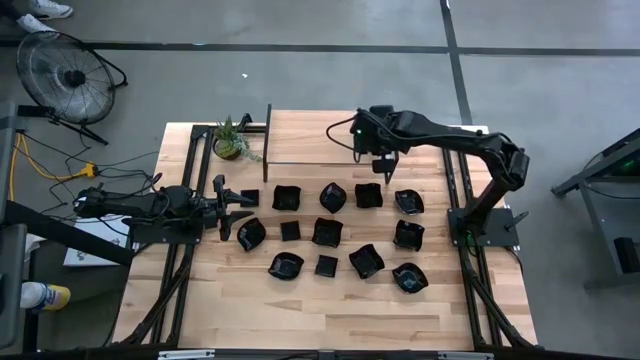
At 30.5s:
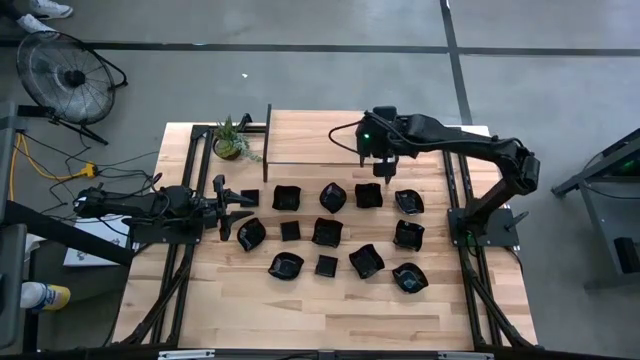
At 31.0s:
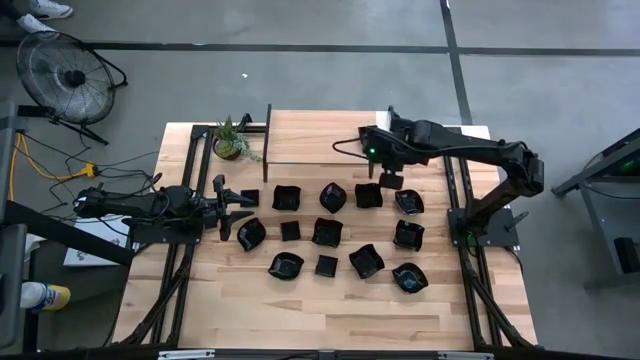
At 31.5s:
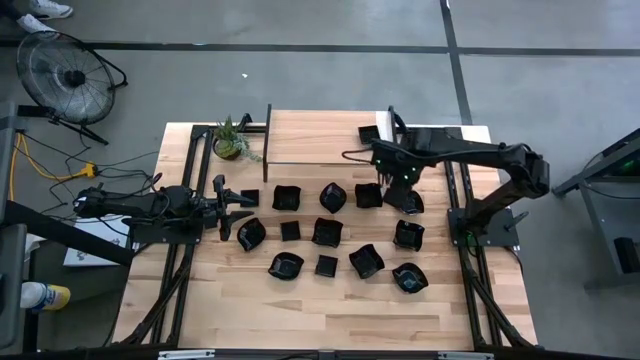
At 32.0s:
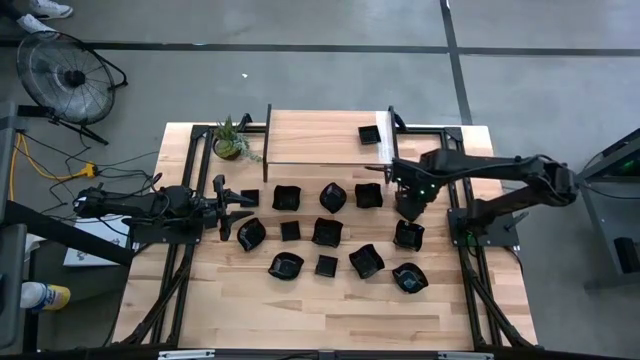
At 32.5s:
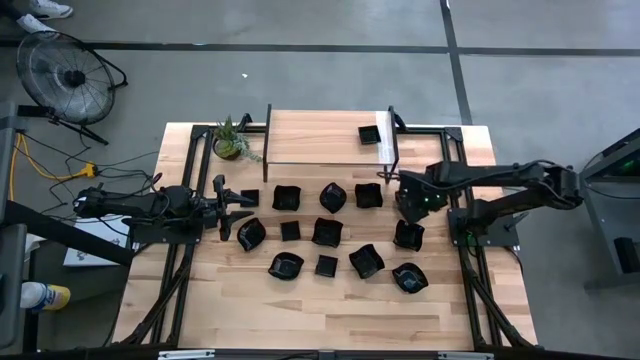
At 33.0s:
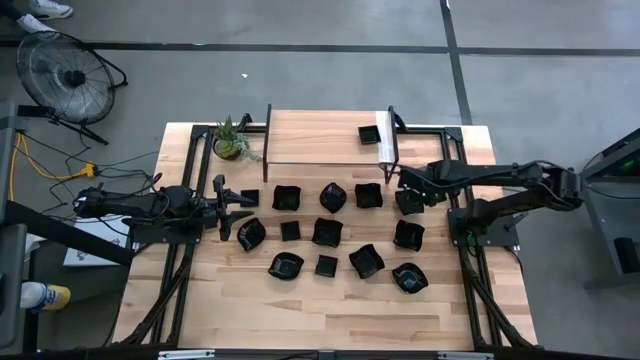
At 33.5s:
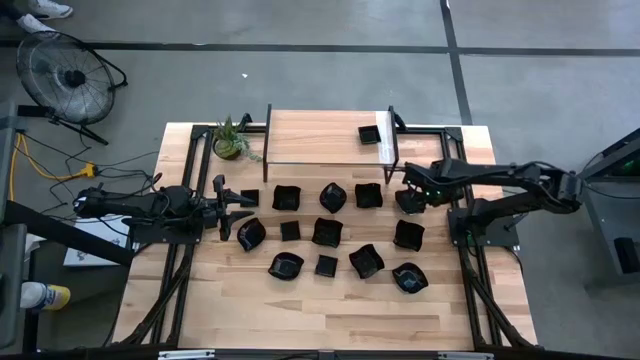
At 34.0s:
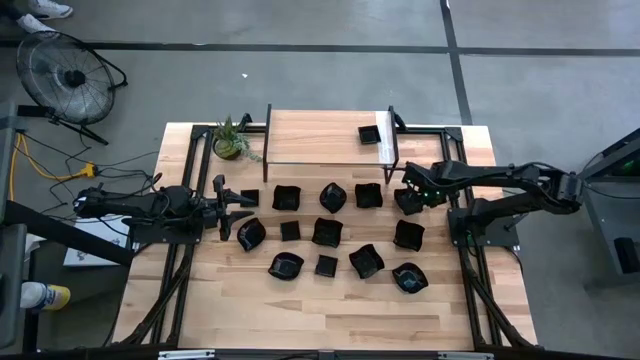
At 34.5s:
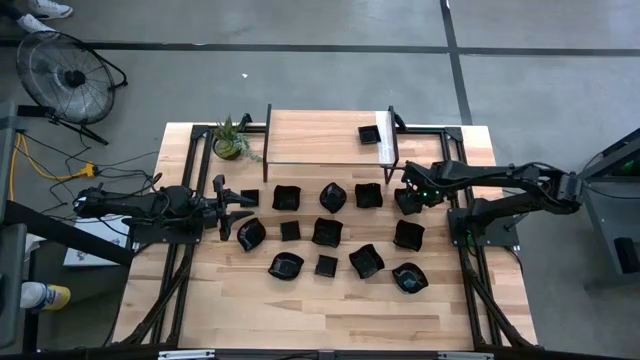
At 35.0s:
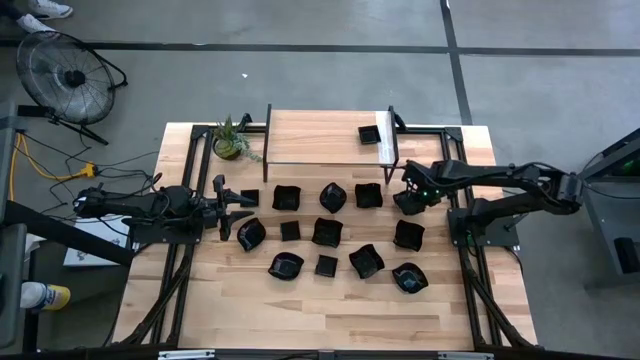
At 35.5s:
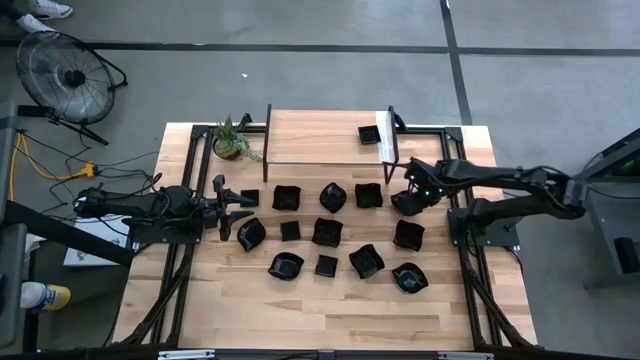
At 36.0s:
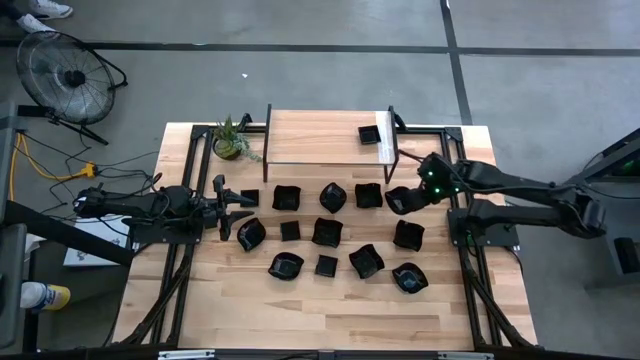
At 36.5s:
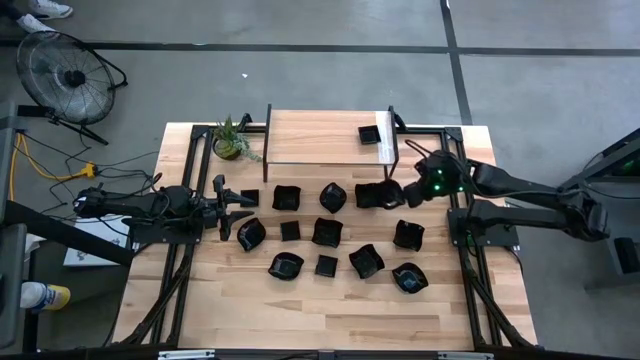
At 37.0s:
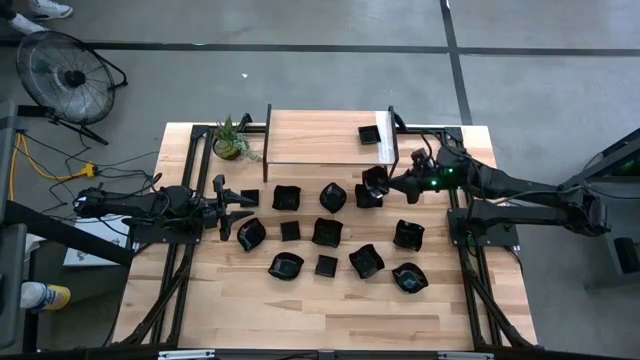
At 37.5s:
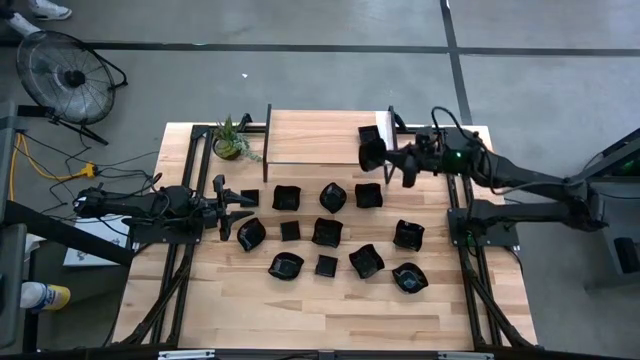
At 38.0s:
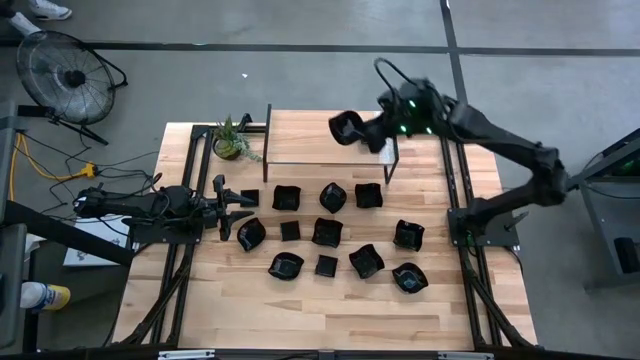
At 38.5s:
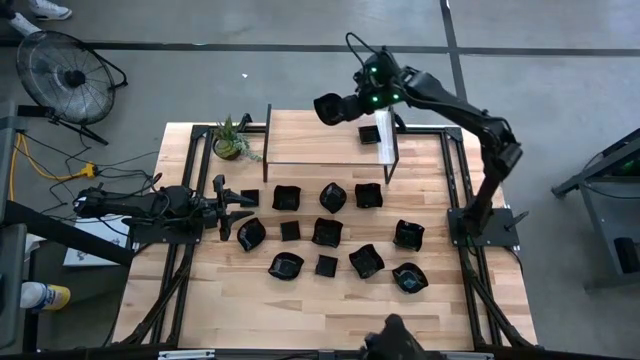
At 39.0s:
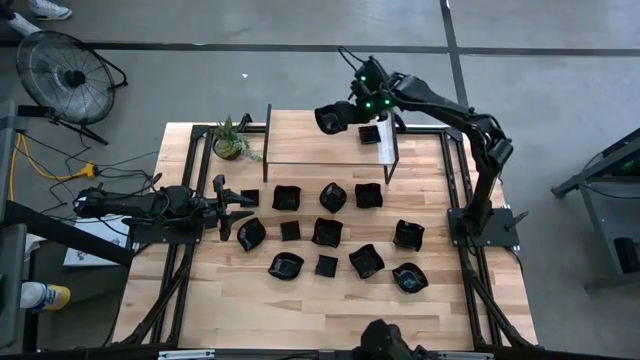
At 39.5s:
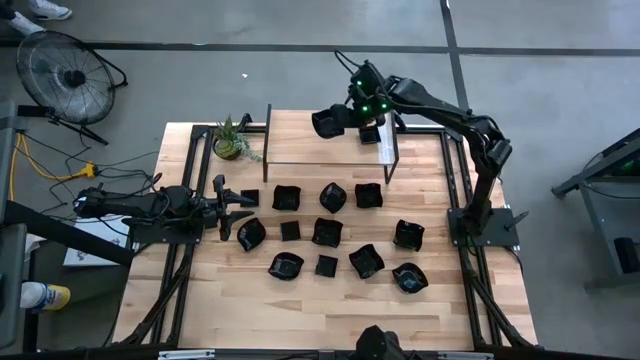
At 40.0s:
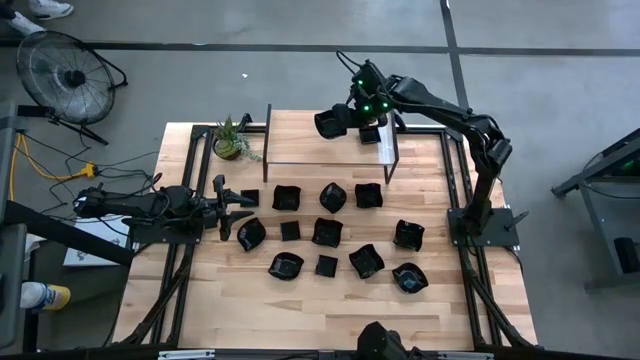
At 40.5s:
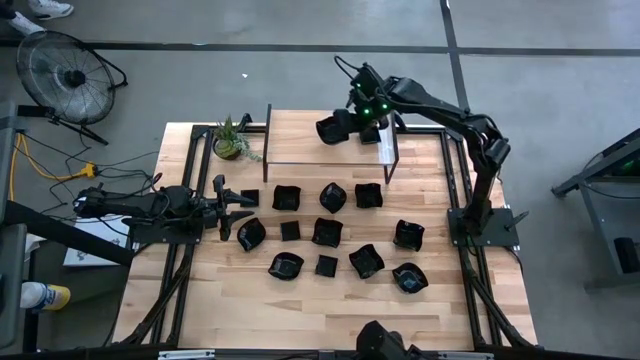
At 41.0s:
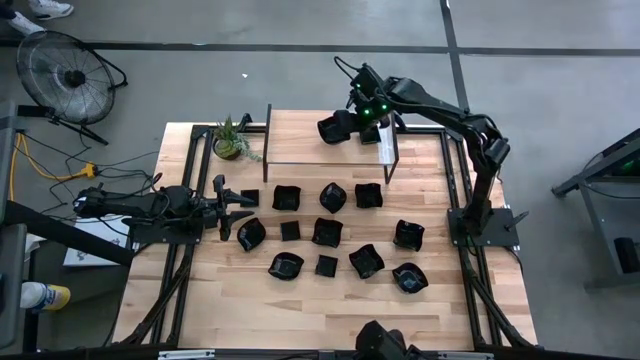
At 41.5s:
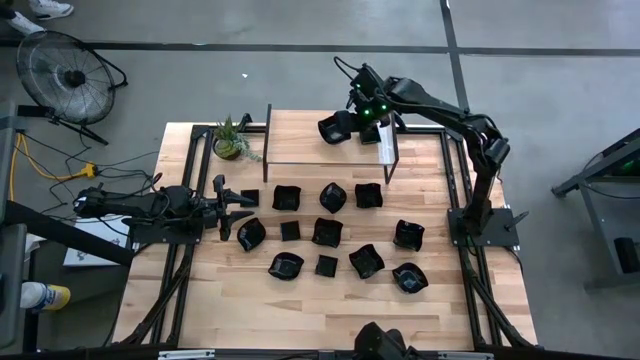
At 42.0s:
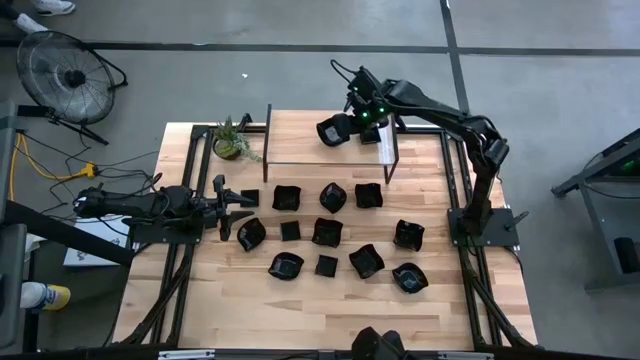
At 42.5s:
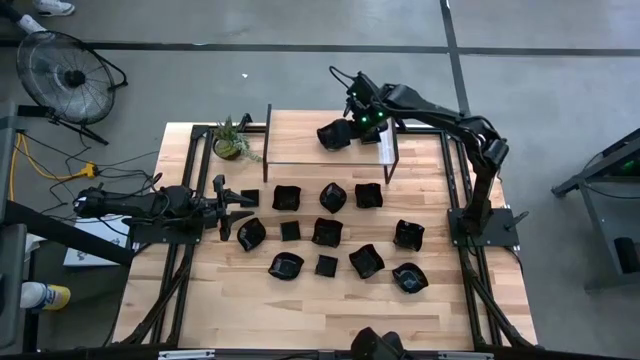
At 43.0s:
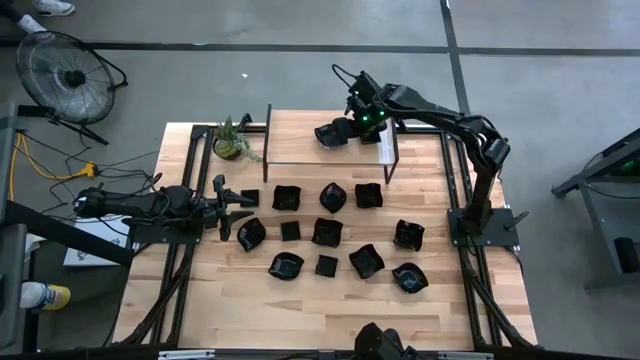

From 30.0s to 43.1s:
Task: Pick & Place Mini shaped plates
Put the black leaf-shaped plate on the shelf

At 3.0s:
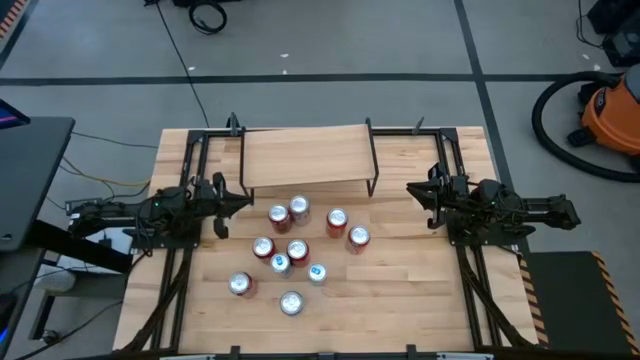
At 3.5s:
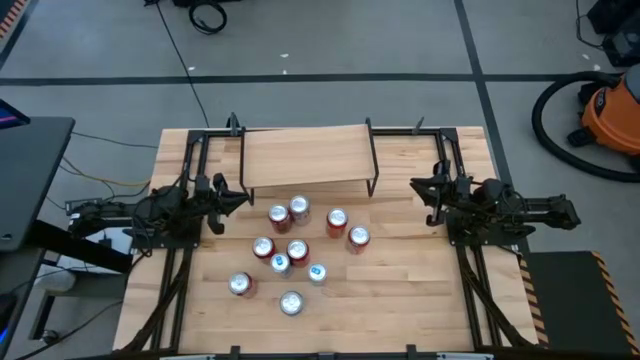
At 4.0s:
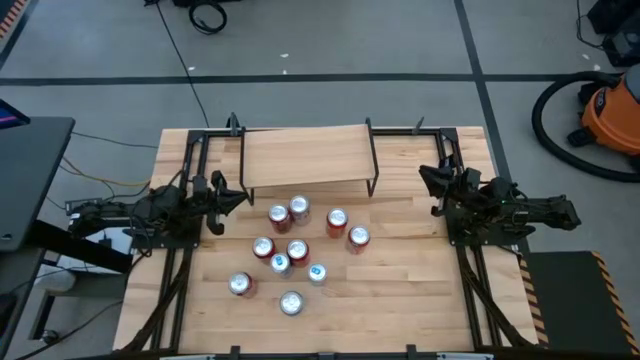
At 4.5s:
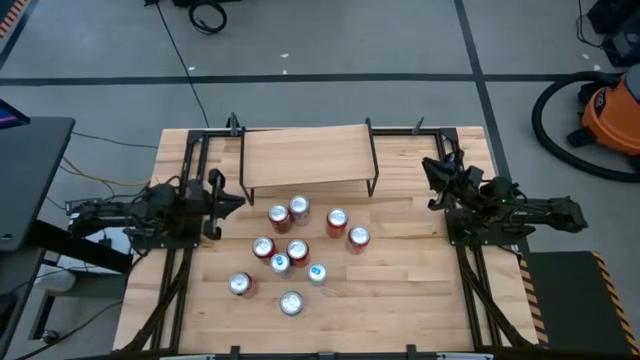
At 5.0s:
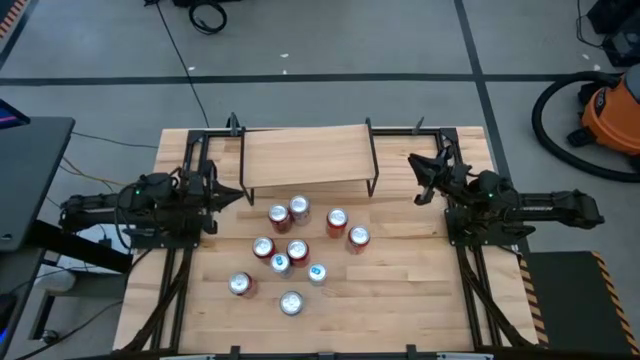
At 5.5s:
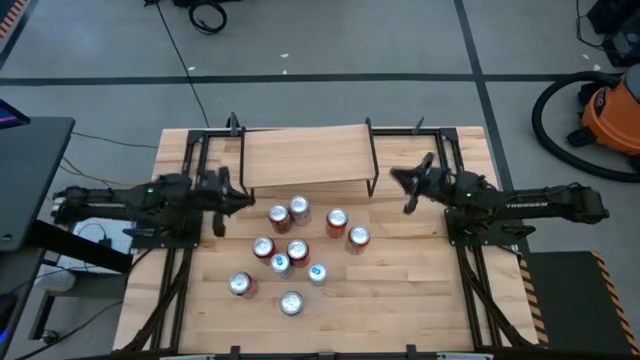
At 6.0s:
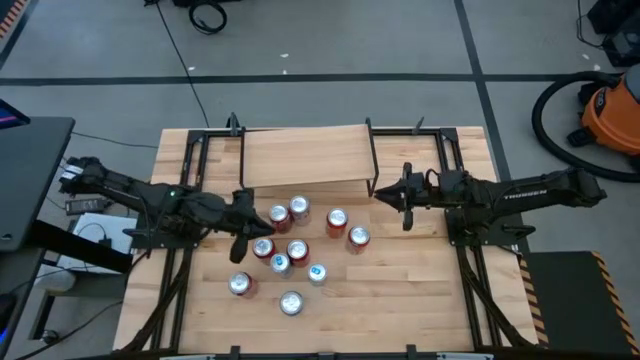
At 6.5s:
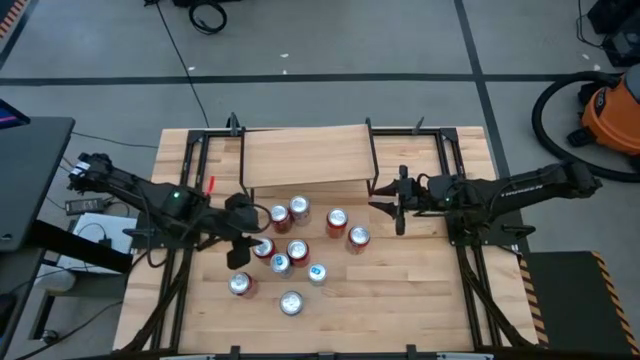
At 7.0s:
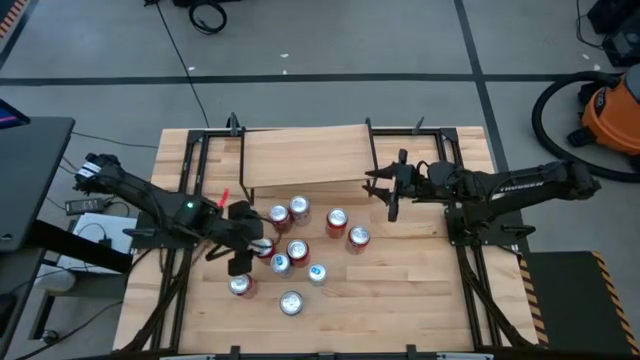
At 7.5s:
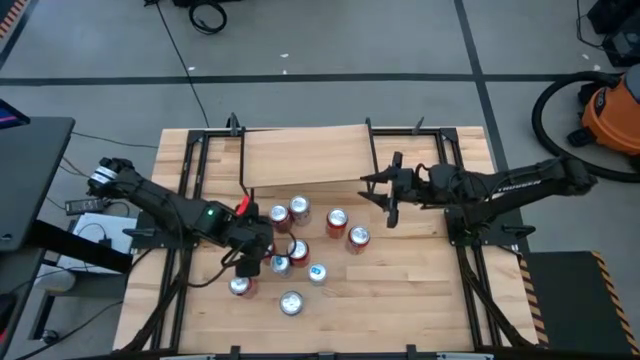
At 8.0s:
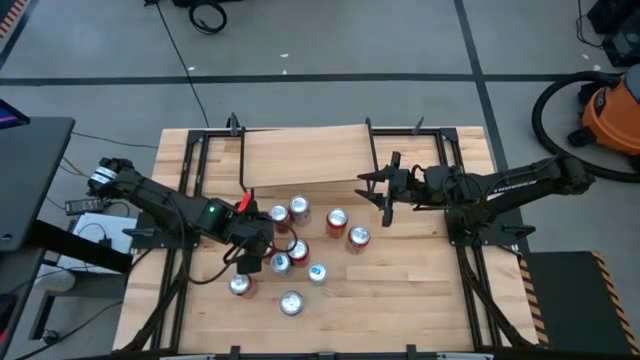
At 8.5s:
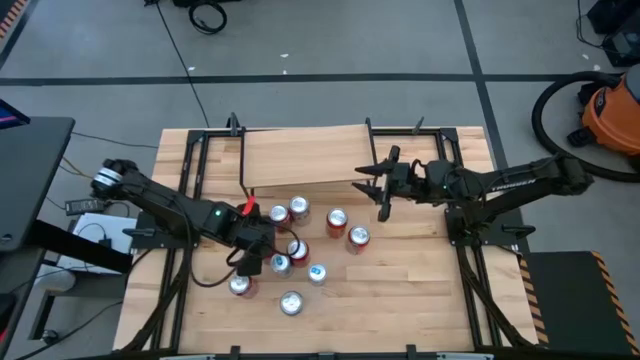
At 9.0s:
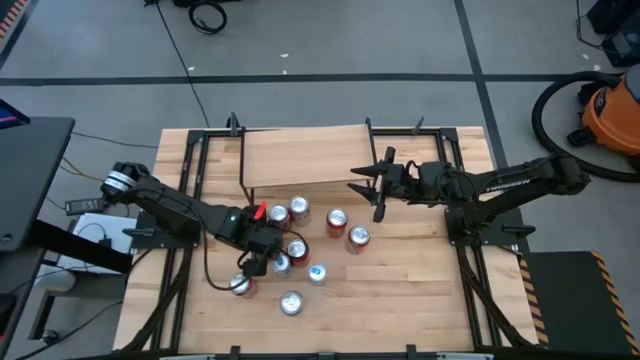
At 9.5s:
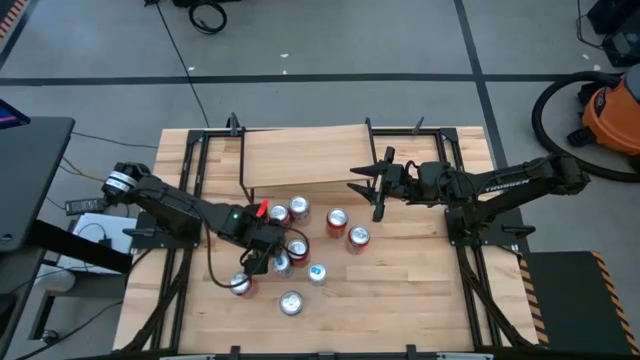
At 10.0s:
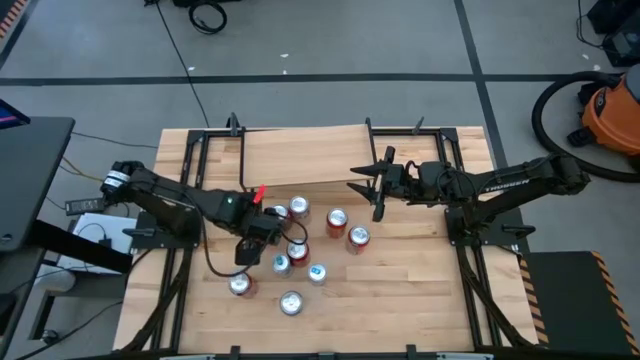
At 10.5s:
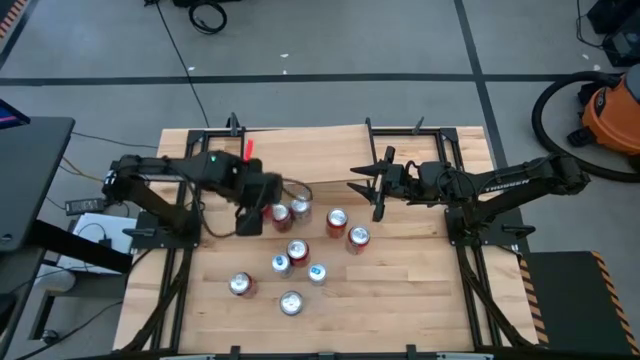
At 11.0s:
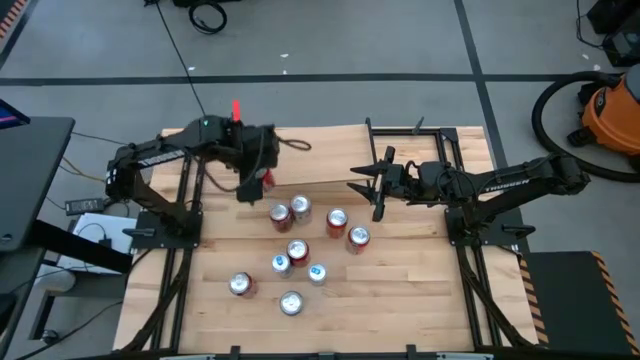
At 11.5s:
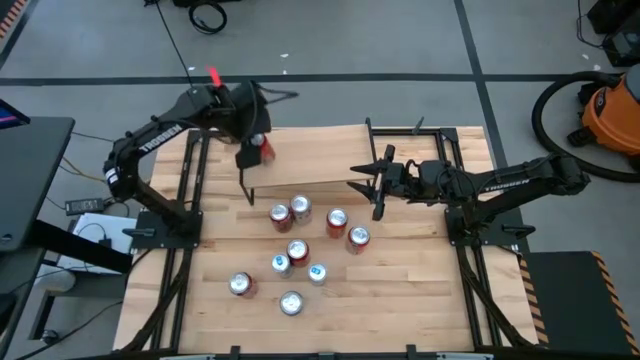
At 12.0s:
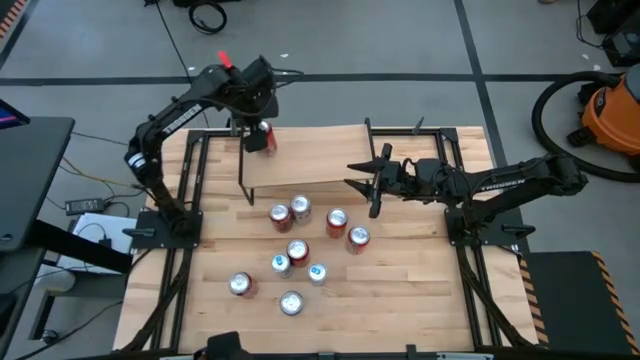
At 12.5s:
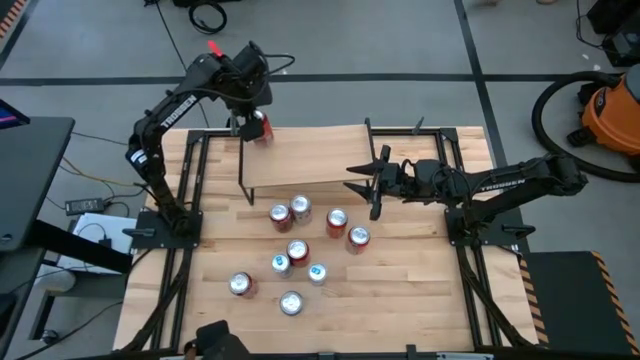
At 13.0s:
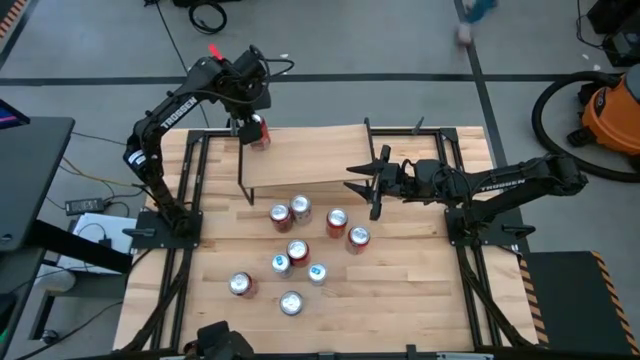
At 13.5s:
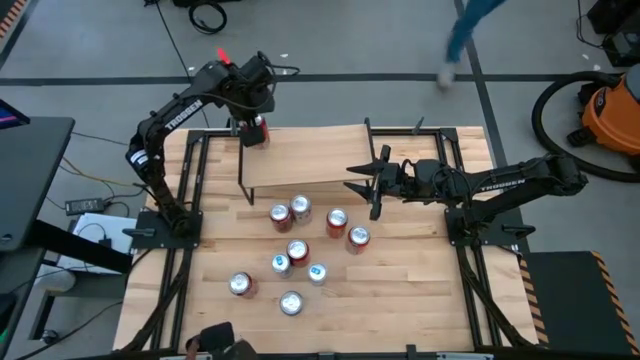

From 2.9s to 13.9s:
Task: Place canned beverage on shelf
Put the red black soda can on the shelf
